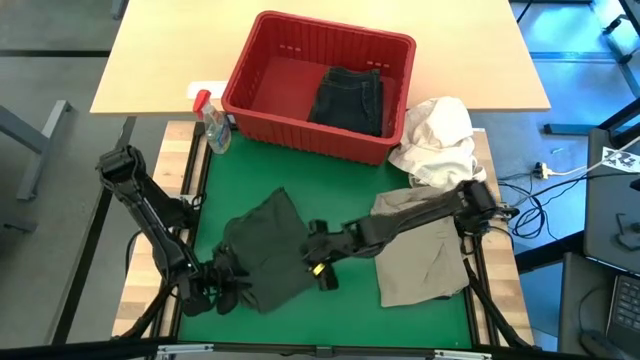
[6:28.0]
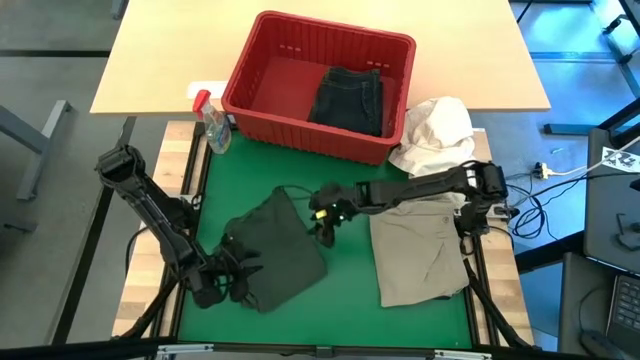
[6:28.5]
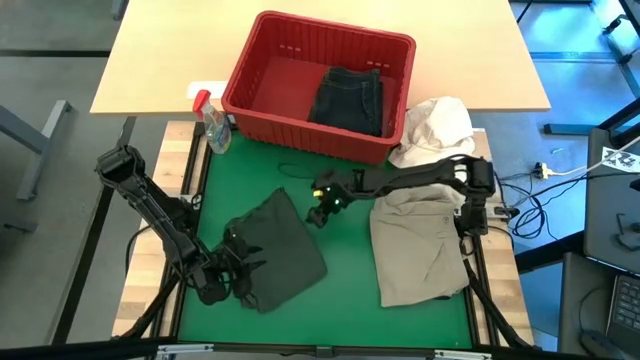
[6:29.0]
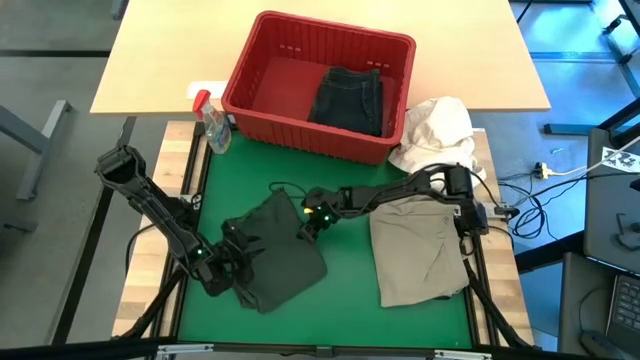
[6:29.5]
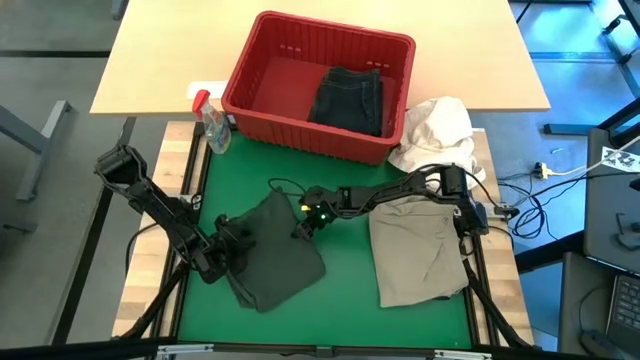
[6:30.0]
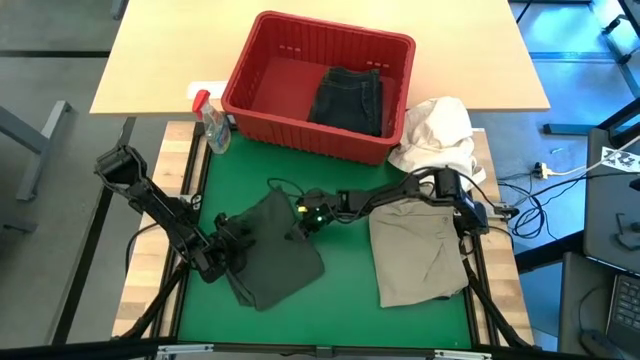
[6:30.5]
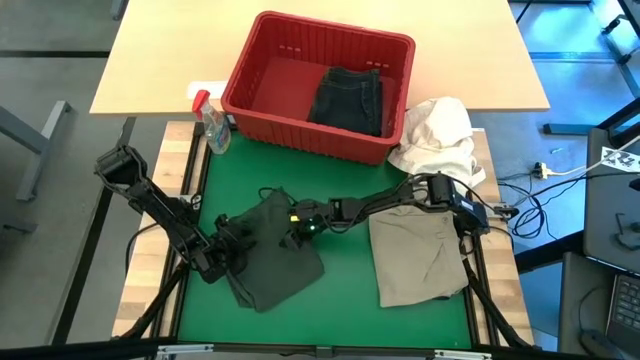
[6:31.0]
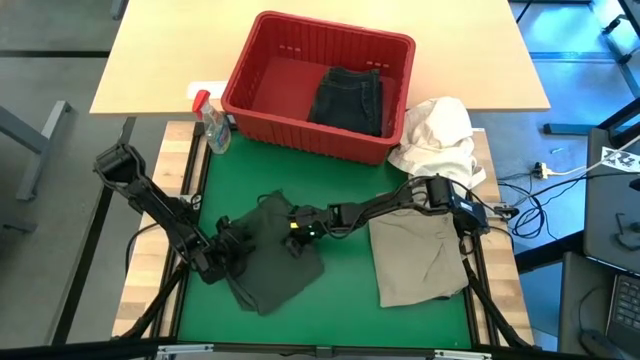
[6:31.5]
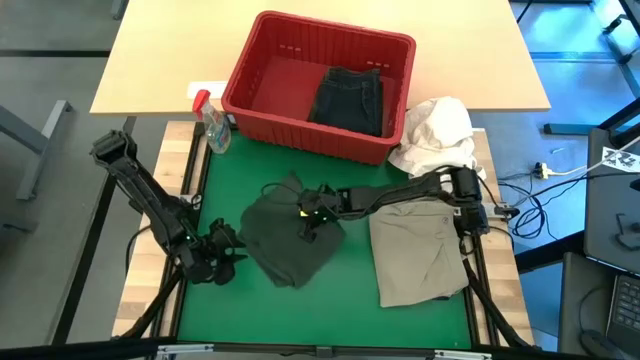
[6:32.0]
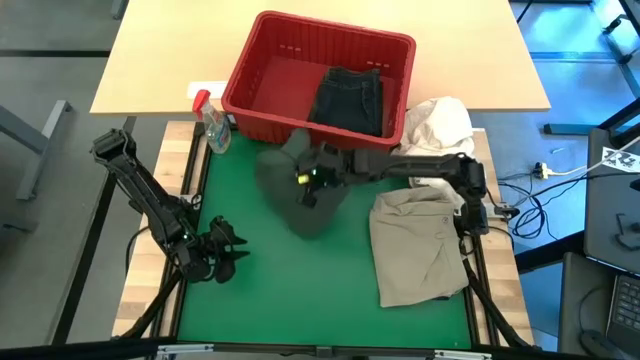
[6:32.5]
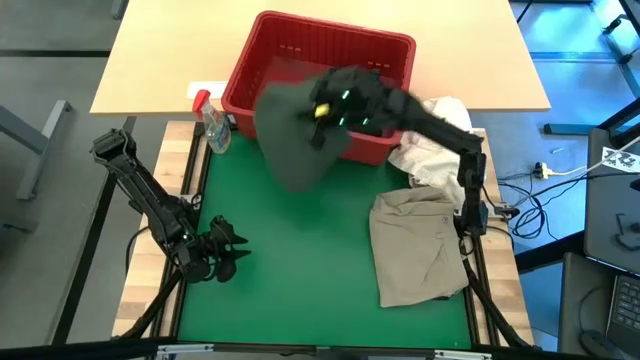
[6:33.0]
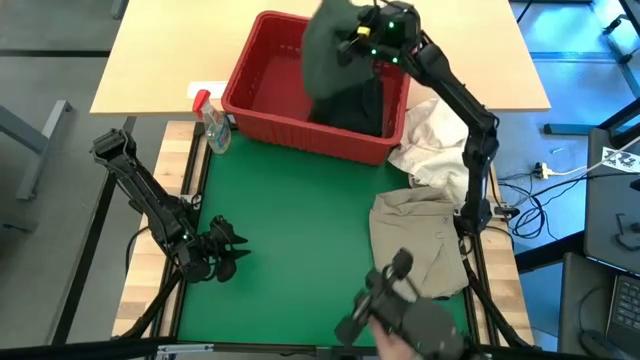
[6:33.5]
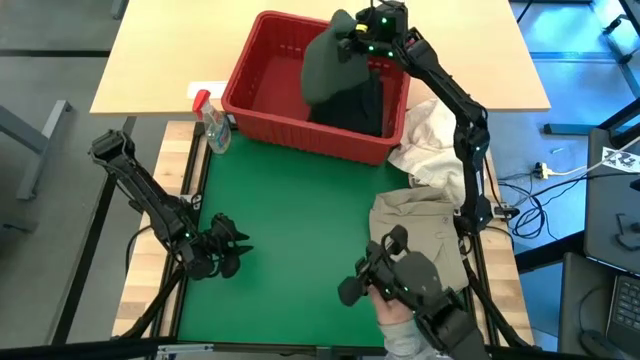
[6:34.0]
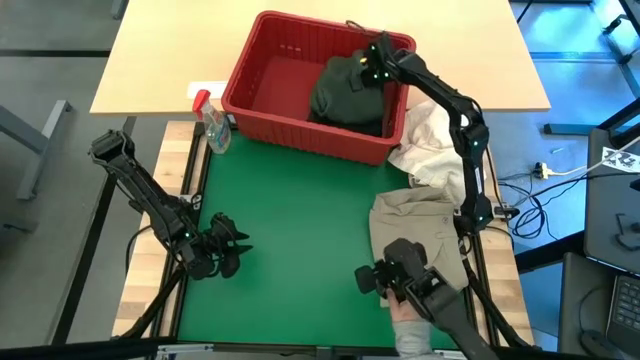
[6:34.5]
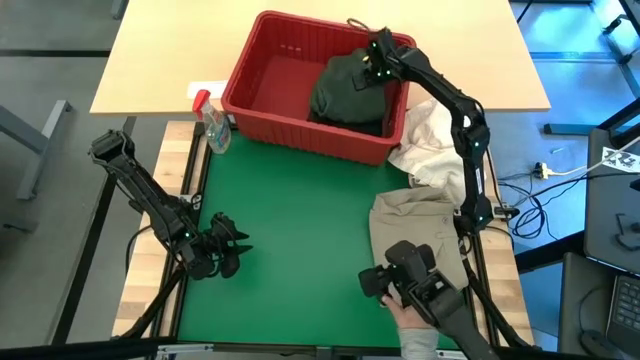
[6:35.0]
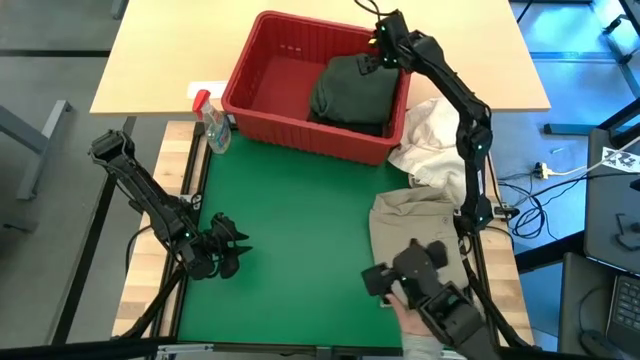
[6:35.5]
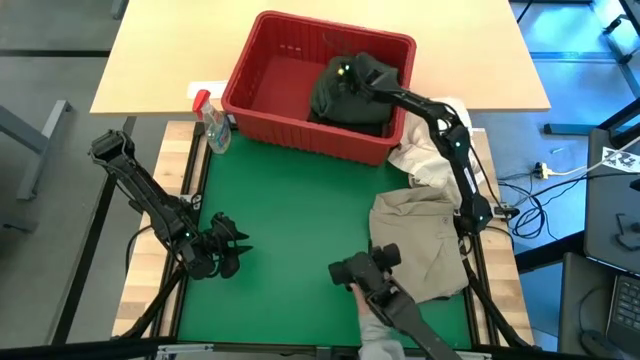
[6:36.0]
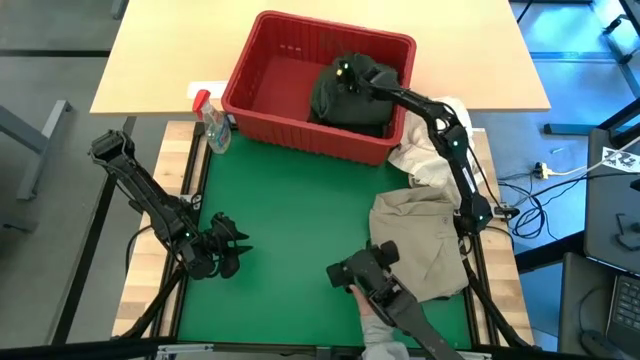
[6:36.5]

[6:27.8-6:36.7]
Task: Fold Laundry from Bin
Put the green polo shirt into the red laundry bin

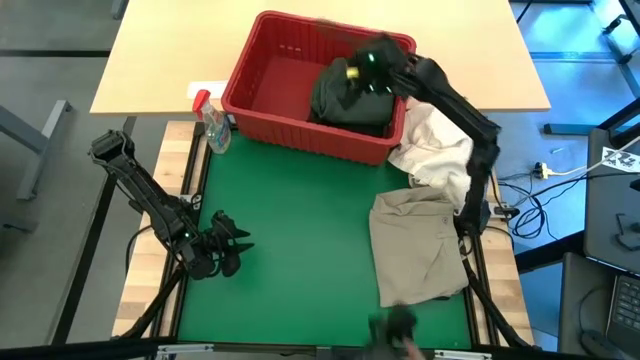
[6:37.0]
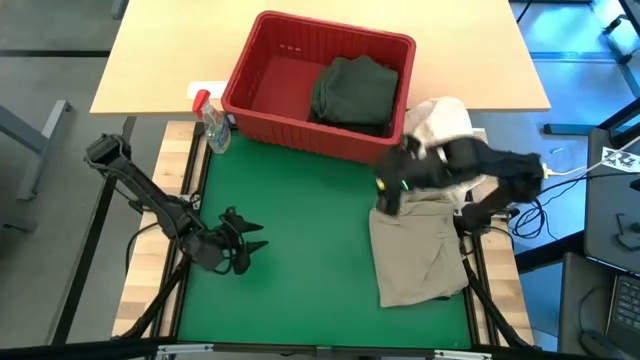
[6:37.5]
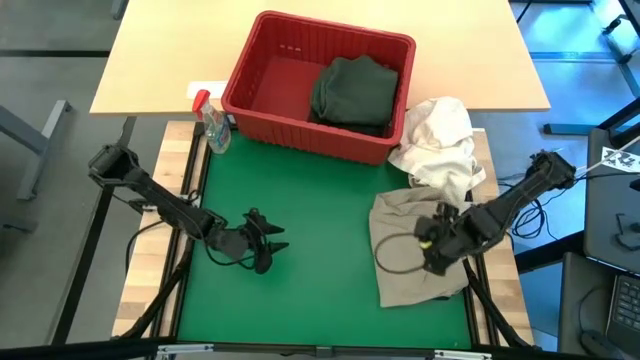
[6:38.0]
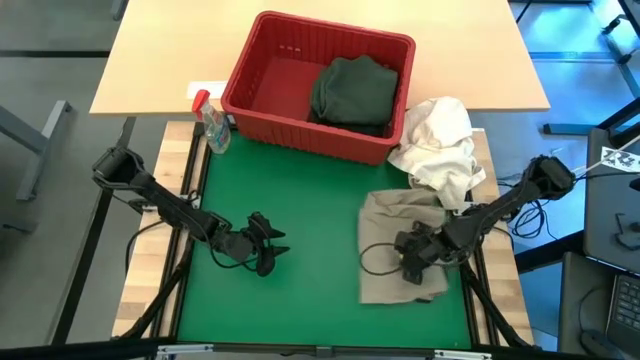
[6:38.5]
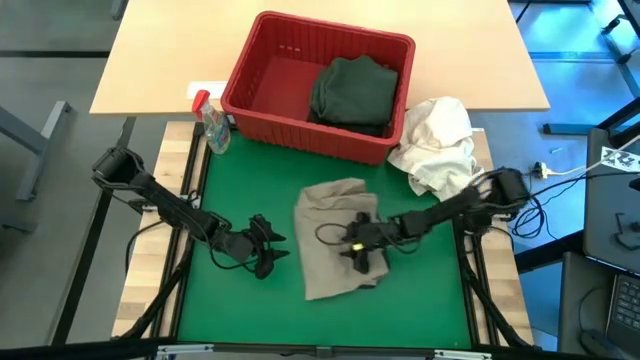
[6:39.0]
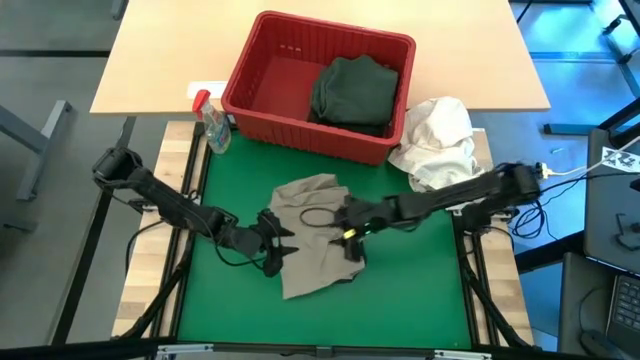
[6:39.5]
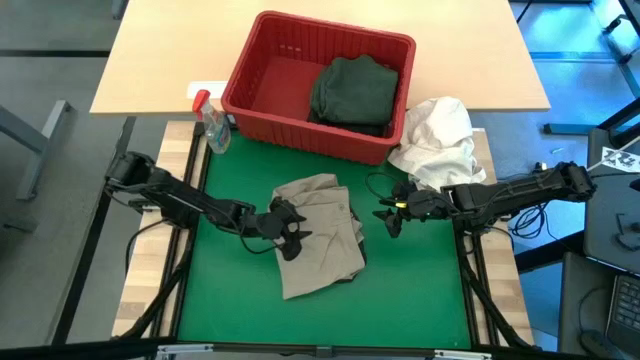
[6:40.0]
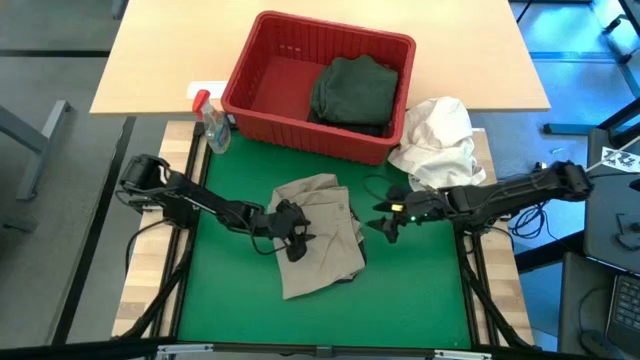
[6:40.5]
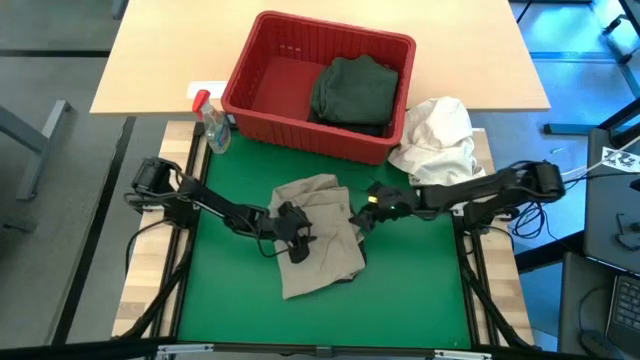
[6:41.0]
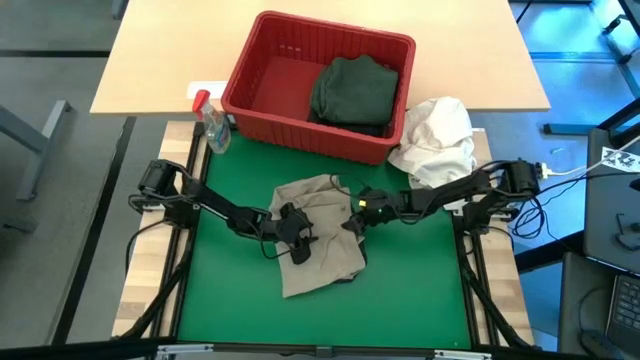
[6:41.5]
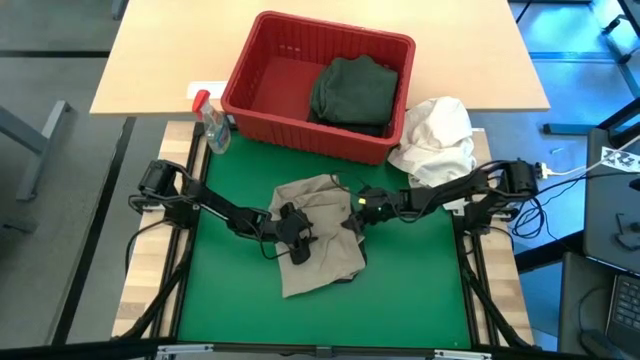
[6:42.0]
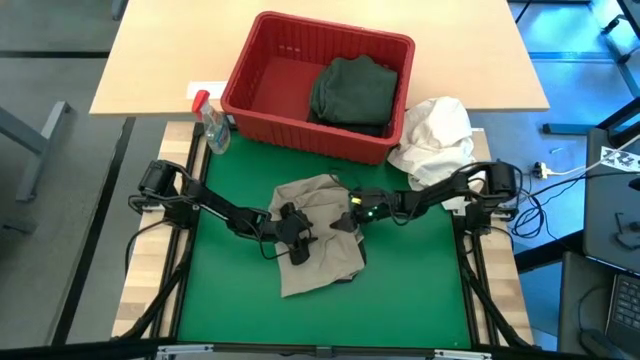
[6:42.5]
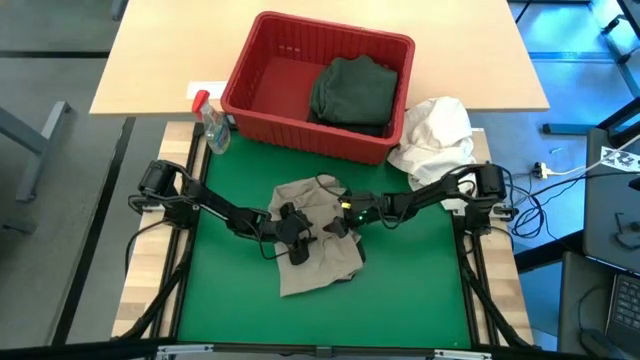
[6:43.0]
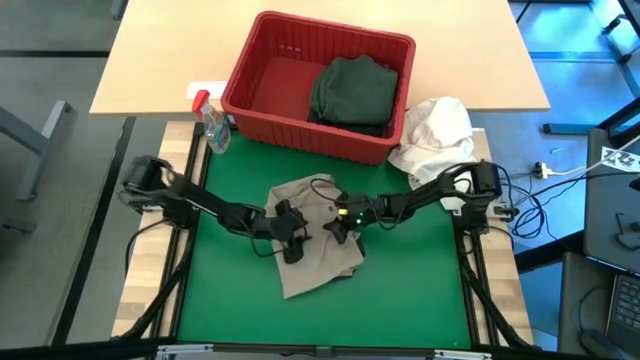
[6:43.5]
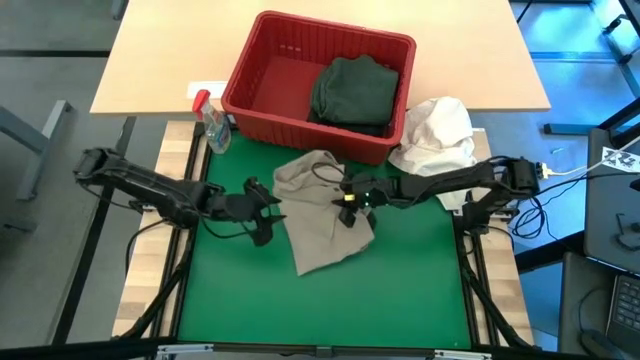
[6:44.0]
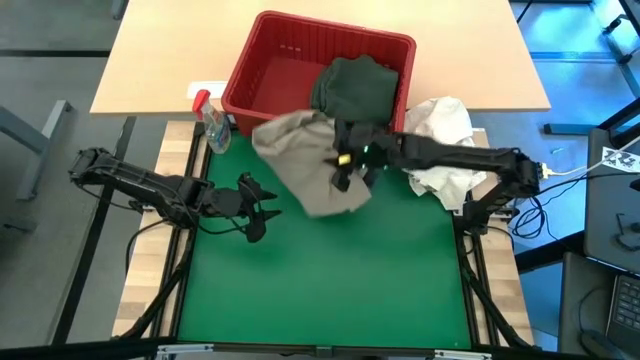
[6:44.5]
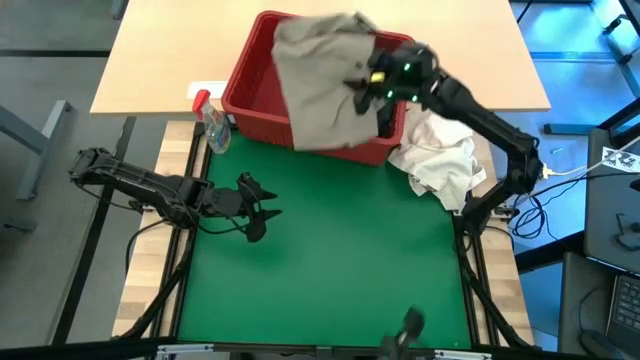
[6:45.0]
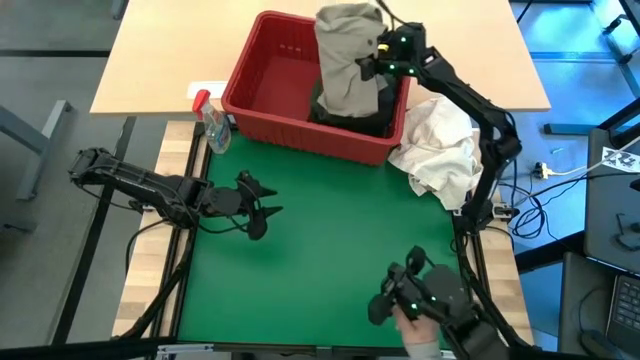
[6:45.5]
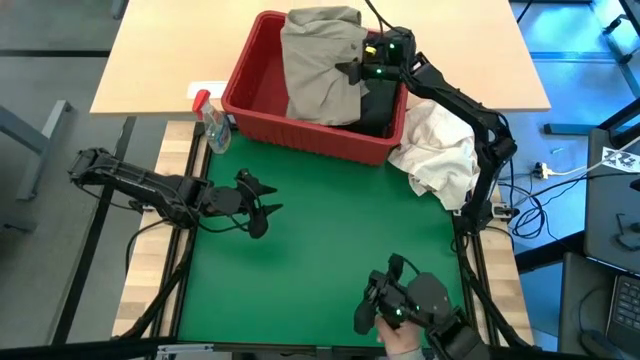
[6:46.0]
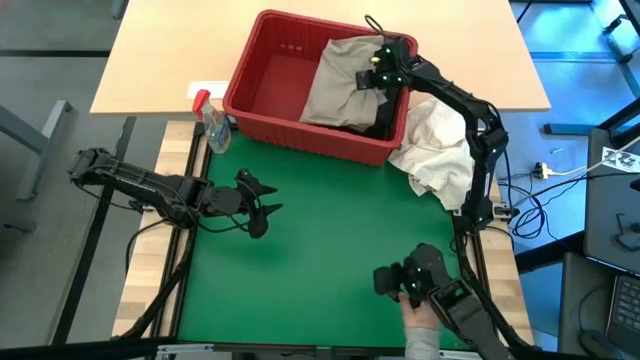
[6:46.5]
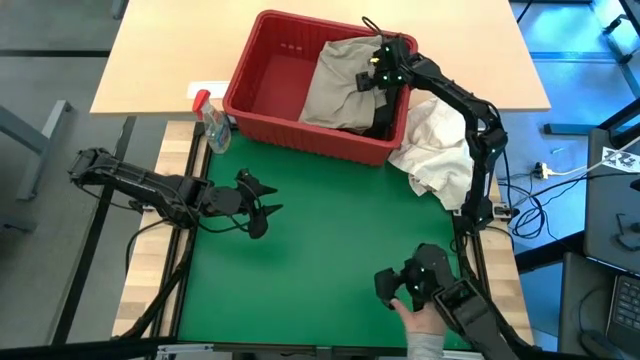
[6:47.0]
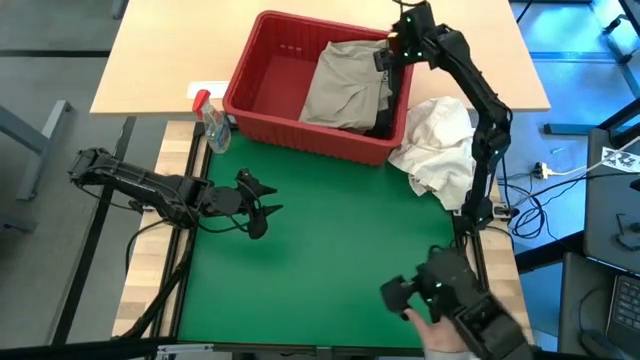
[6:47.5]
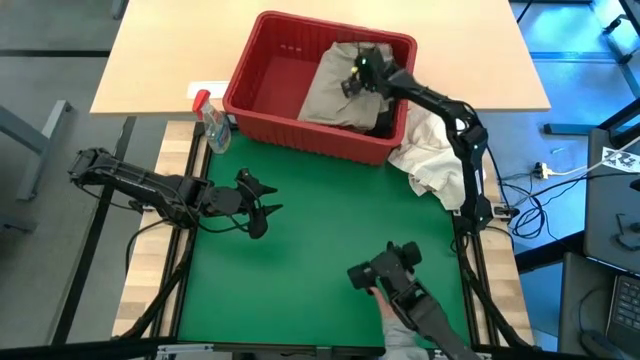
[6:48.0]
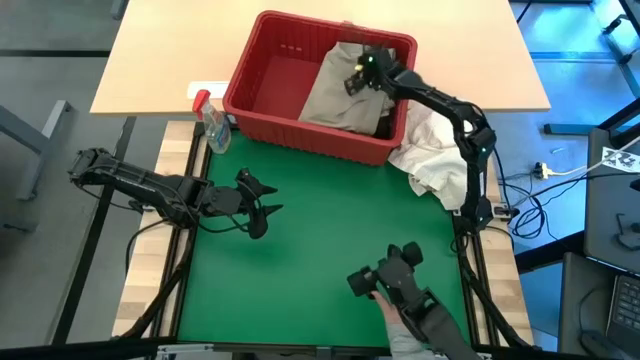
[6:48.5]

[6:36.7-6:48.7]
Put the stacked shorts into the red laundry bin
